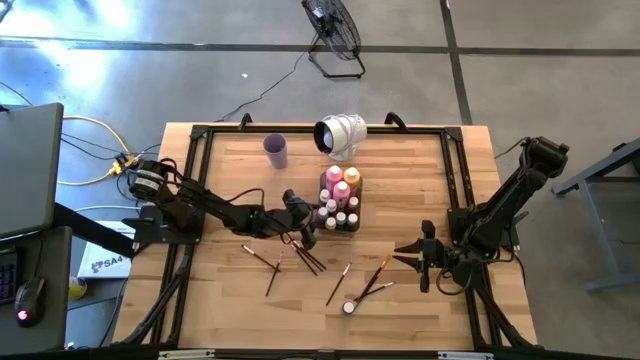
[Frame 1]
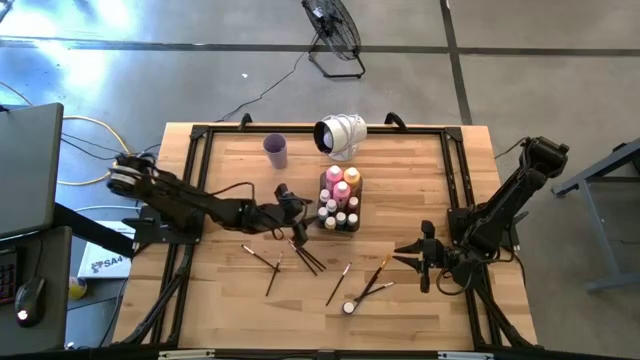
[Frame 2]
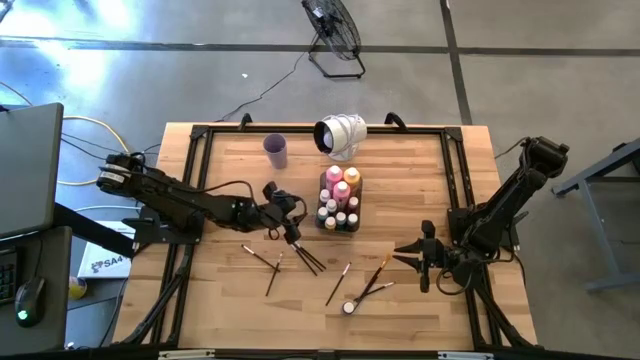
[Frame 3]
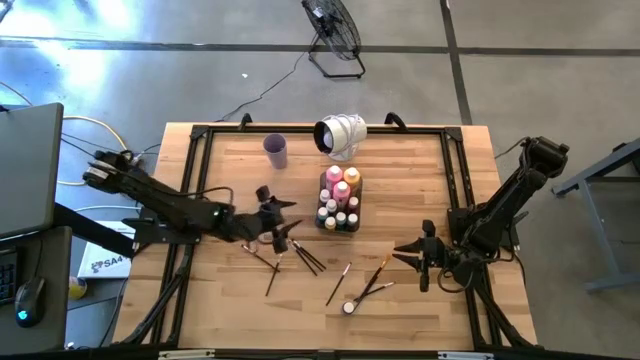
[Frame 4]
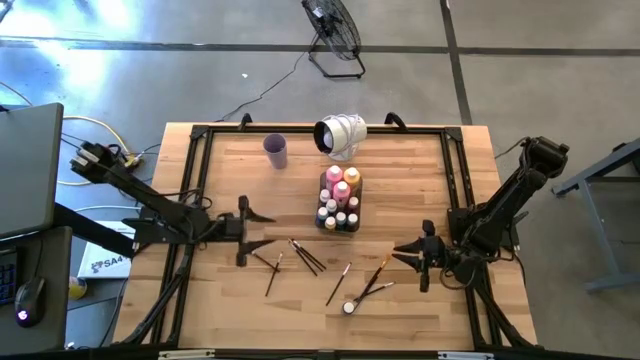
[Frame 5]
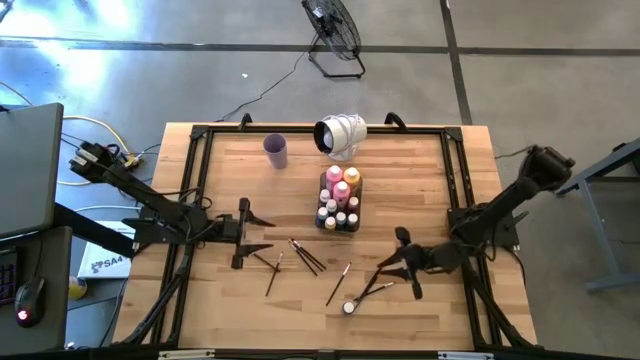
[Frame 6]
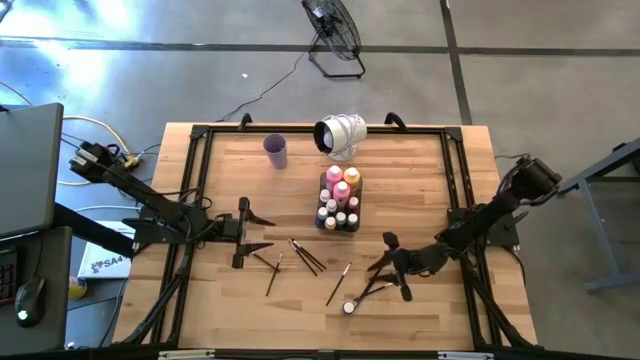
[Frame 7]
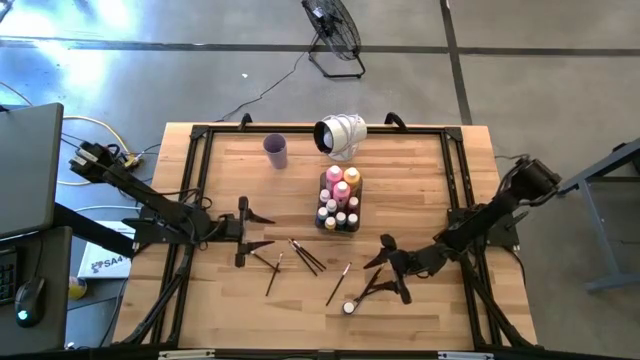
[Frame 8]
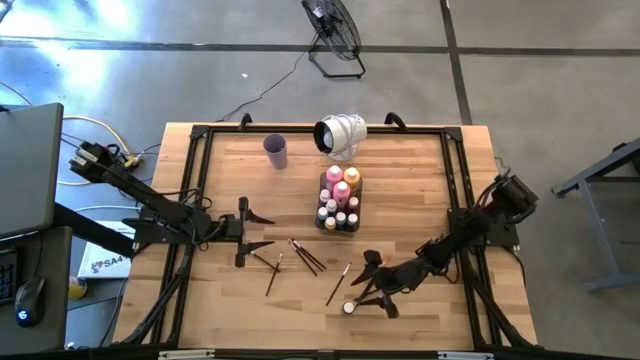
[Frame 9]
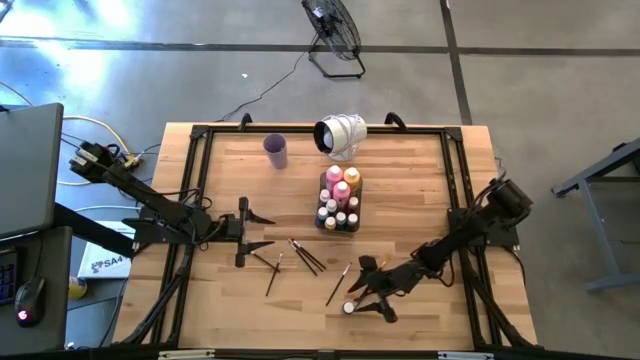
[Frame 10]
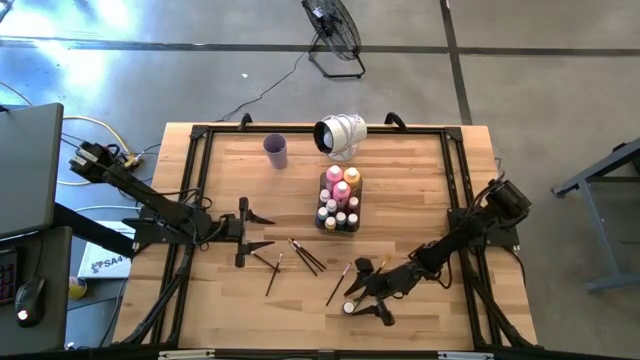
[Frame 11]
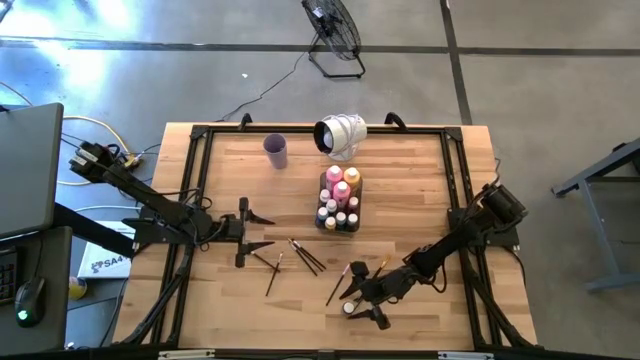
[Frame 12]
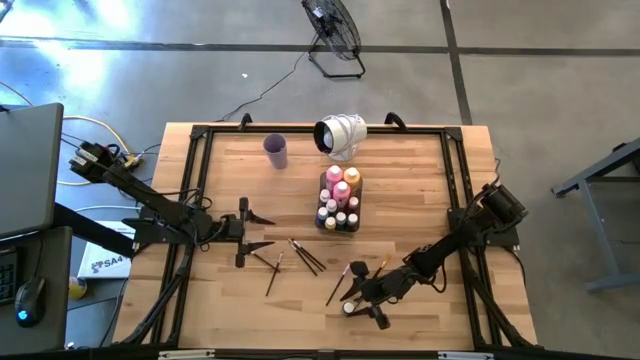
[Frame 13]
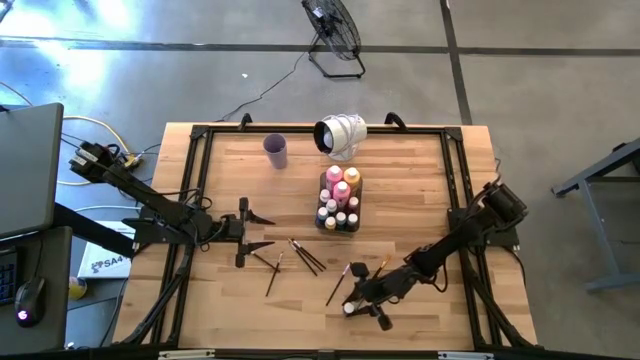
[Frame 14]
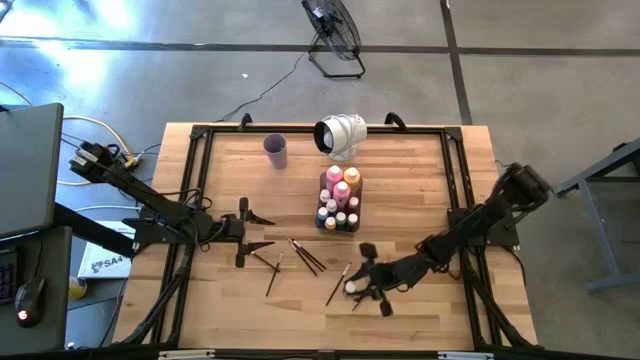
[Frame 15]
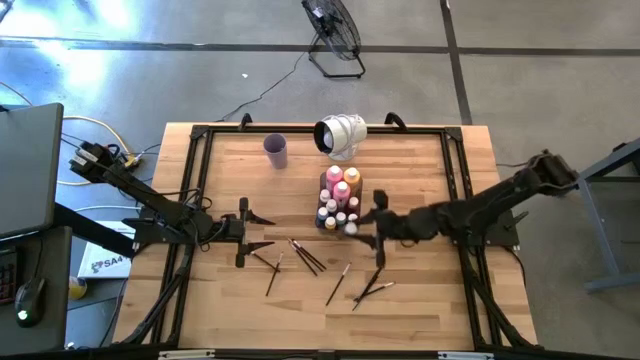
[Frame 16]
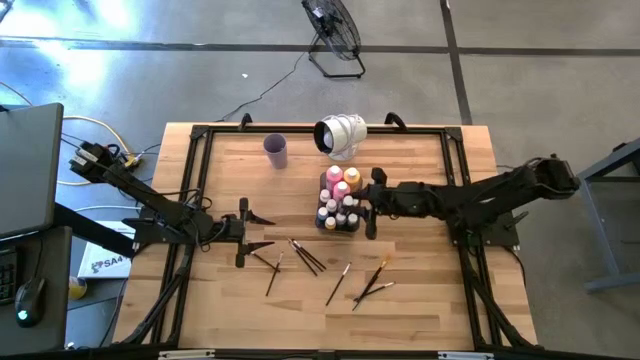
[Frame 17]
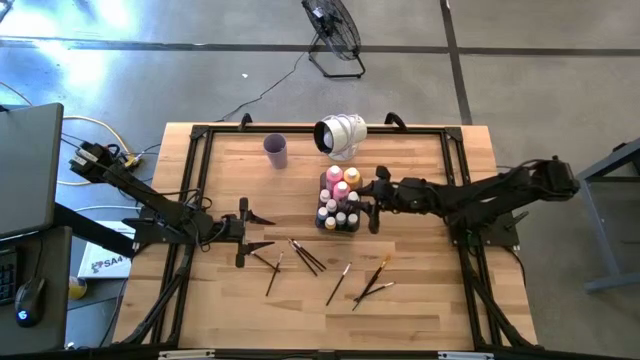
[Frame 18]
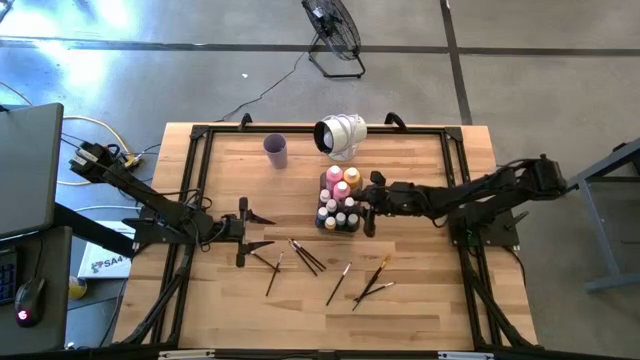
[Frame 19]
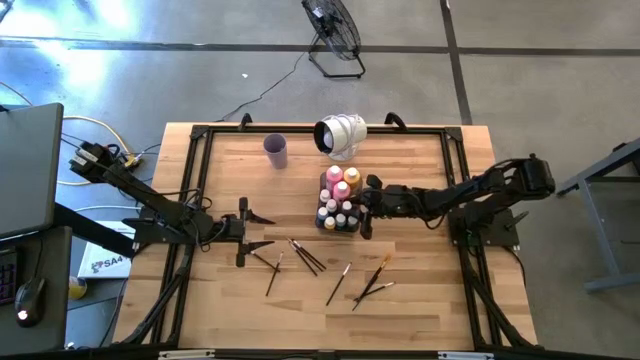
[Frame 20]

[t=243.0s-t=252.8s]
Task: Pick & Place Paint Supplies
Put the dark blue paint bottle into the black bin

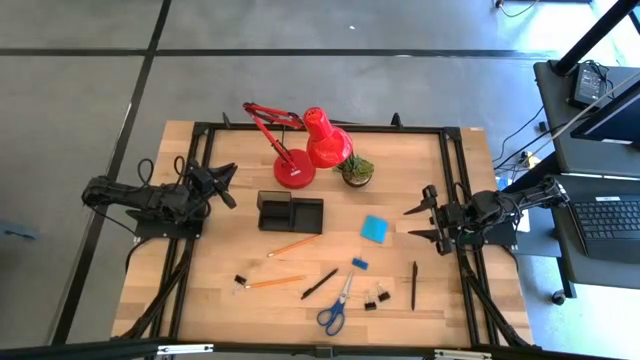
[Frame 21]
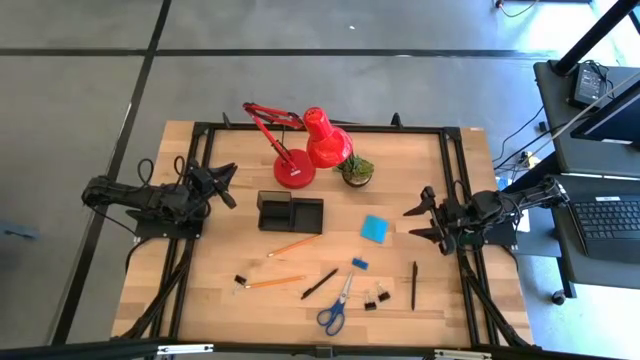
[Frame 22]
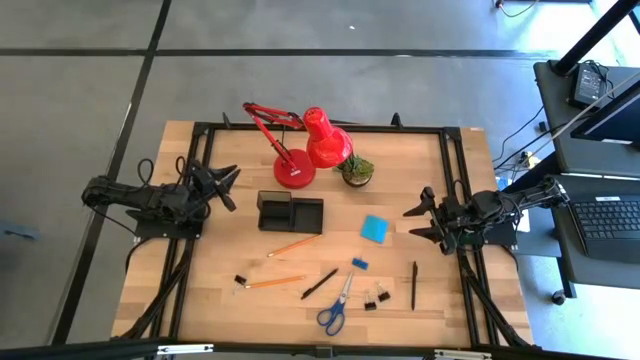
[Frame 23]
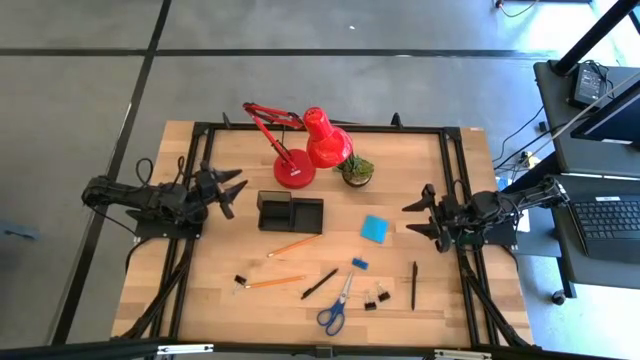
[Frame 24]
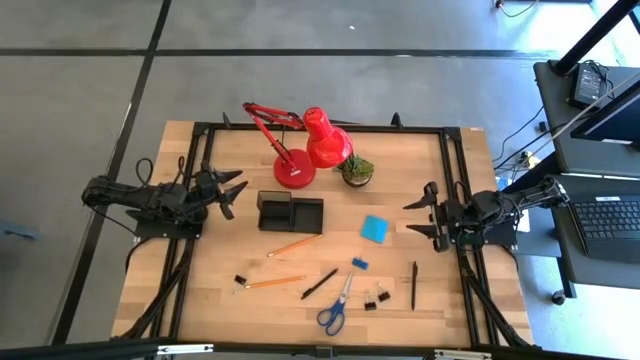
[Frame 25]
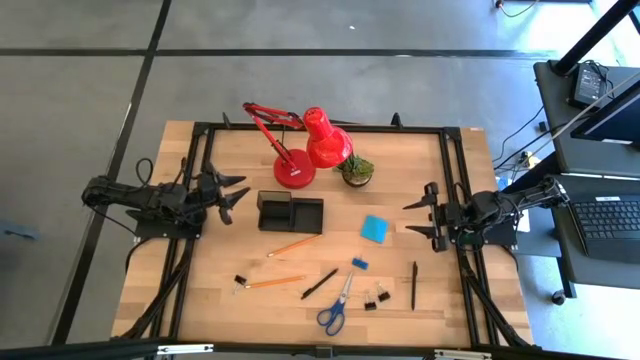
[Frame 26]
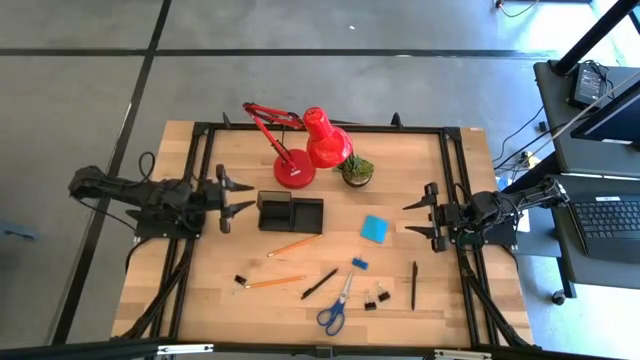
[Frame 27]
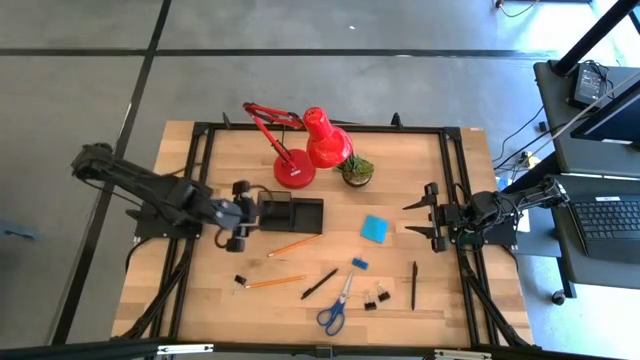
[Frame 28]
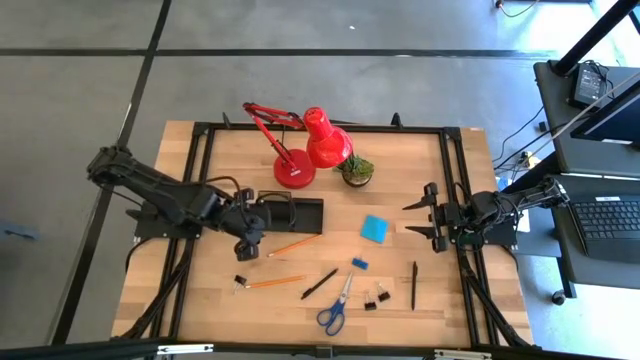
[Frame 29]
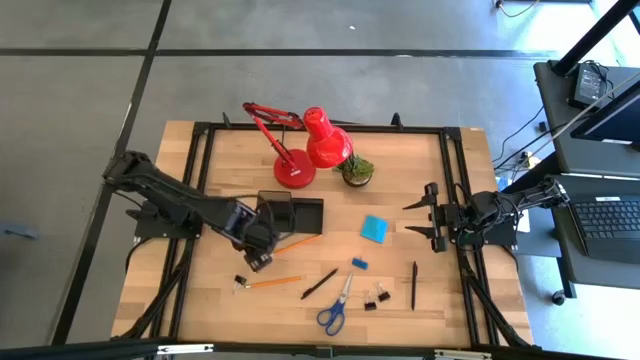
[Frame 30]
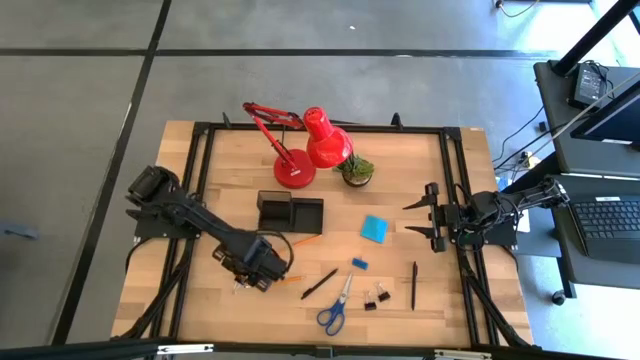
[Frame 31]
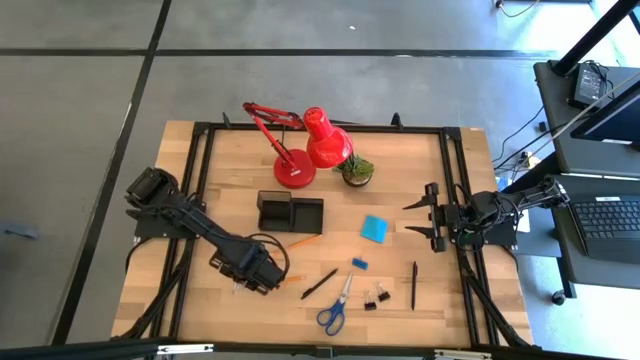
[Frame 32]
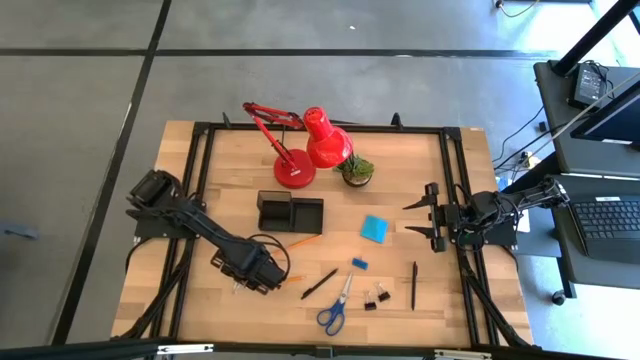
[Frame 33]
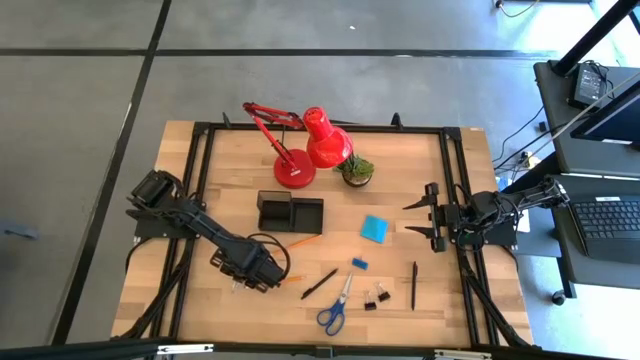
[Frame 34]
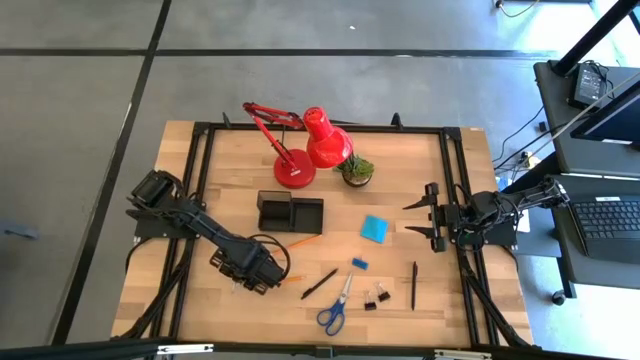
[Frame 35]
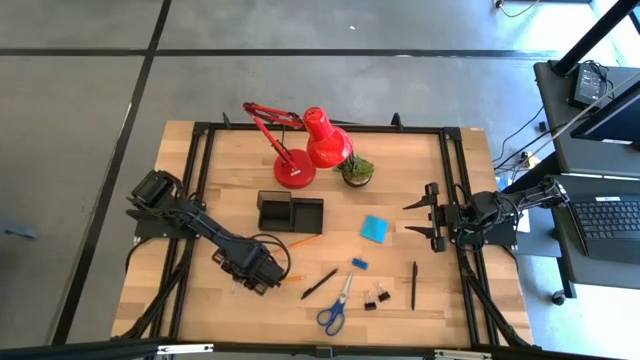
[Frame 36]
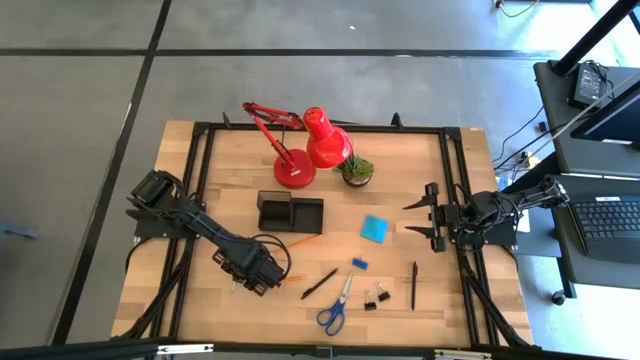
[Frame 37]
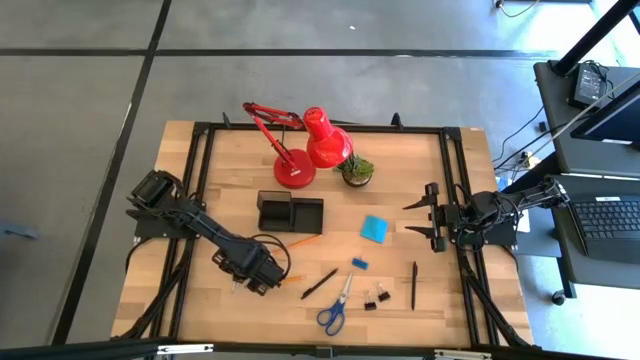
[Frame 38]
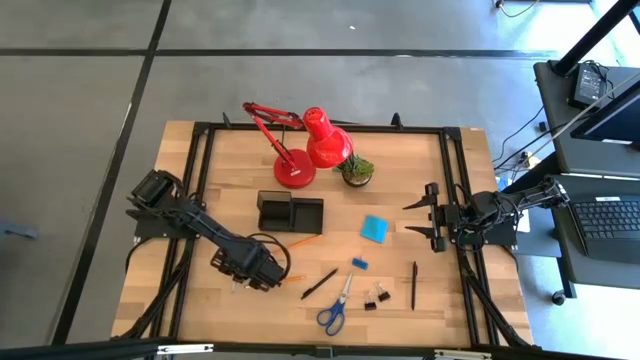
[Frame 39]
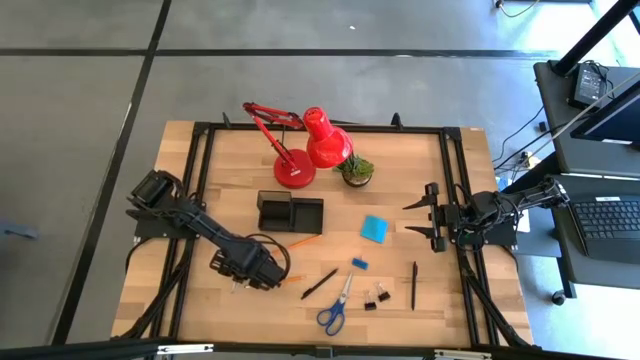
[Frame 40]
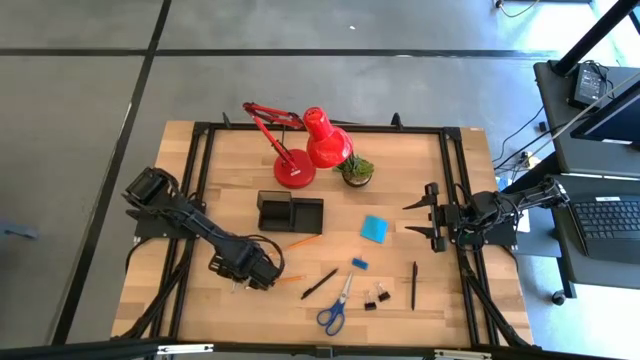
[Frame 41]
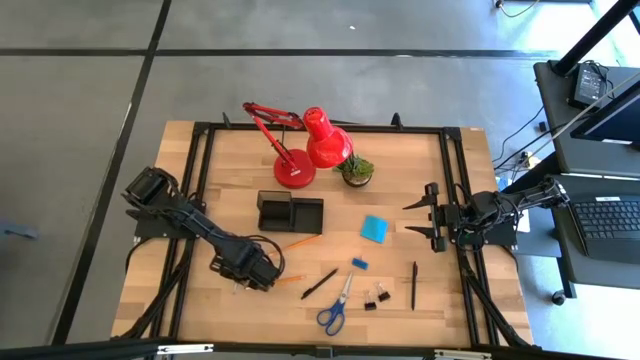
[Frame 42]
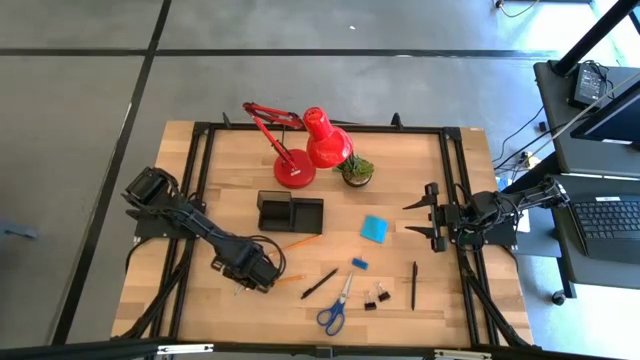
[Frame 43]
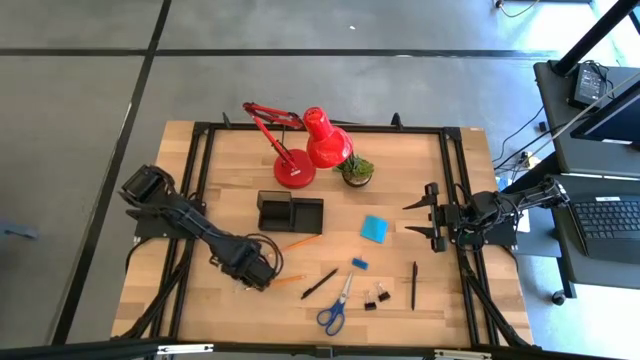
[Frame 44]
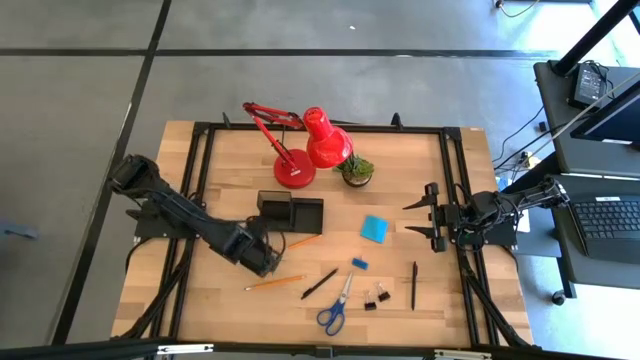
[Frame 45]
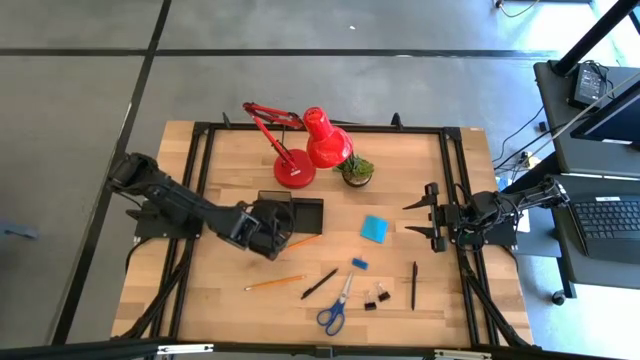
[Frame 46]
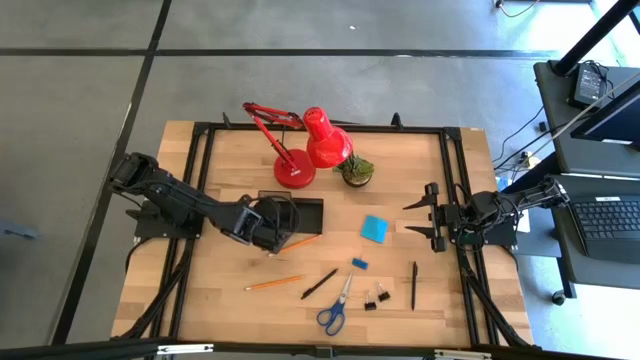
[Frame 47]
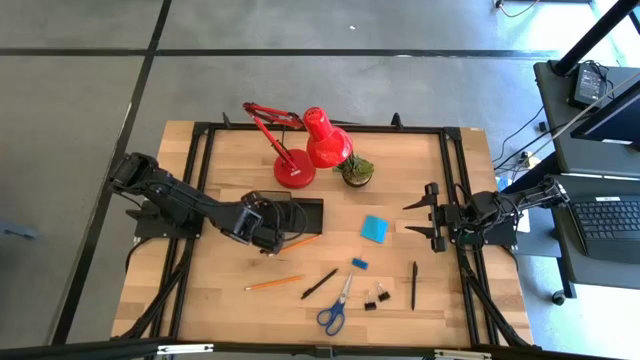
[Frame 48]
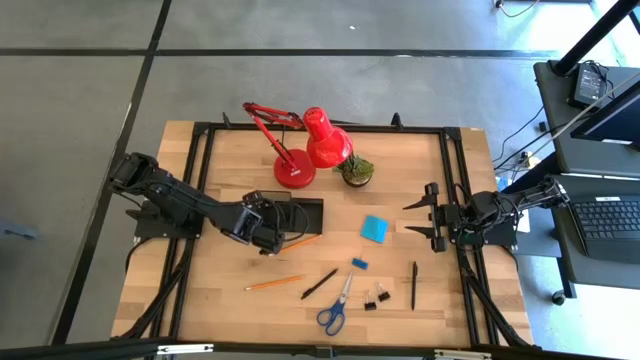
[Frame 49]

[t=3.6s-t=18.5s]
Task: Pick and place office supplies into organizer
Put the left black binder clip into the black desk organizer
